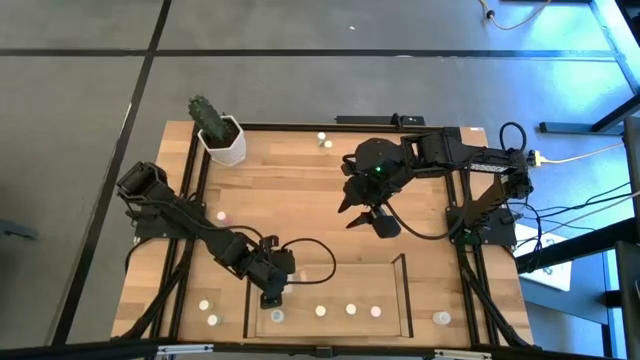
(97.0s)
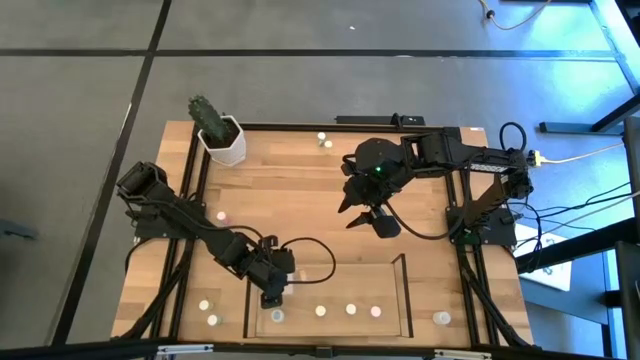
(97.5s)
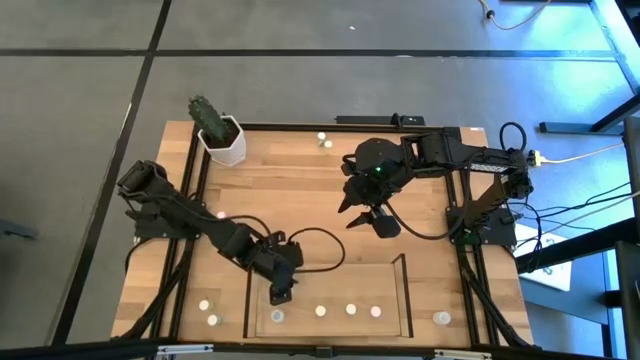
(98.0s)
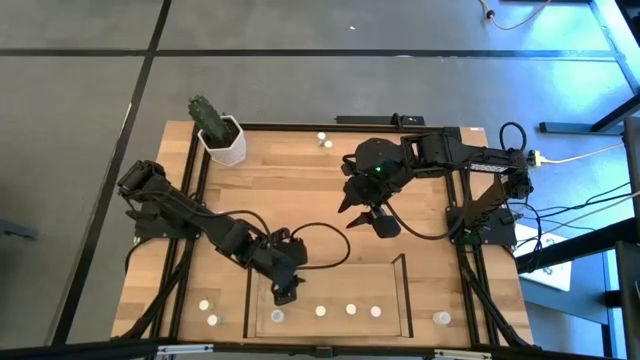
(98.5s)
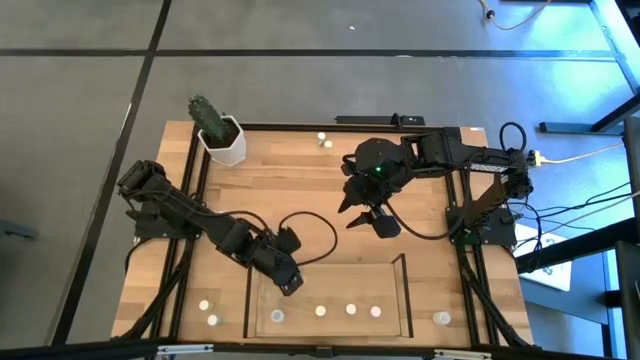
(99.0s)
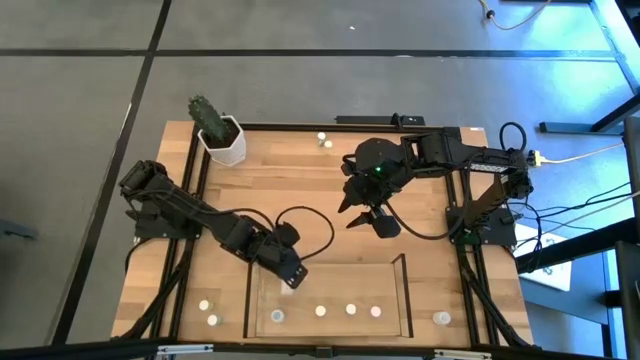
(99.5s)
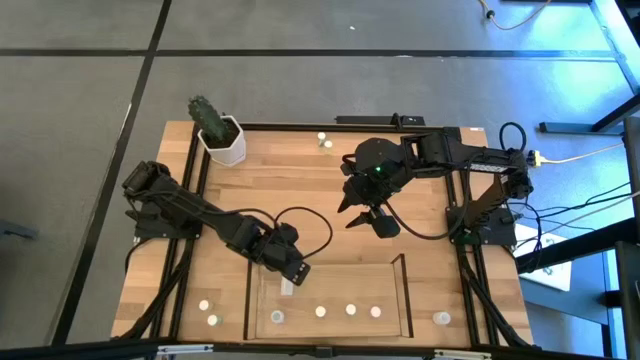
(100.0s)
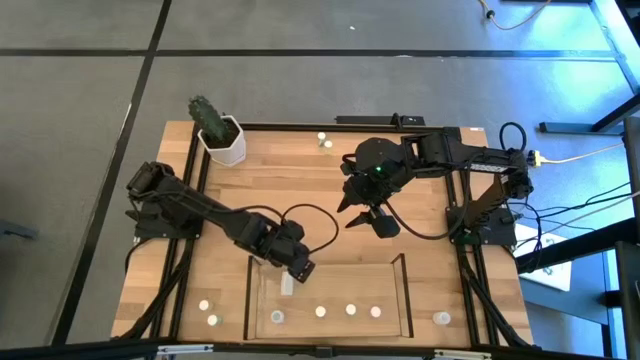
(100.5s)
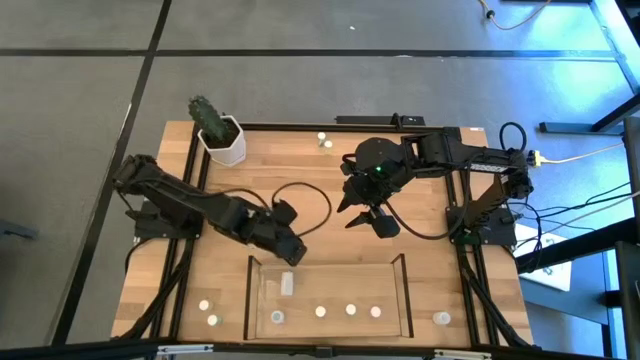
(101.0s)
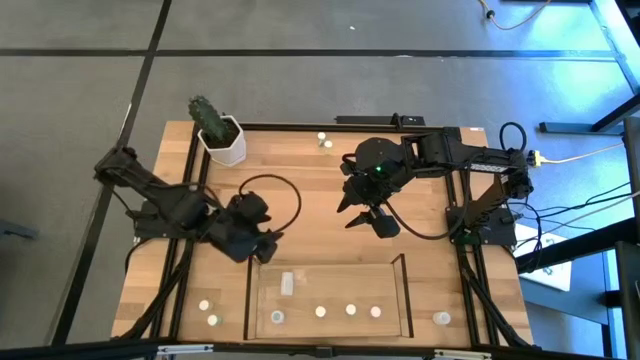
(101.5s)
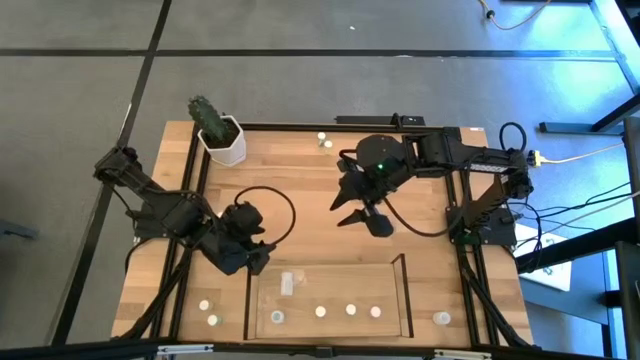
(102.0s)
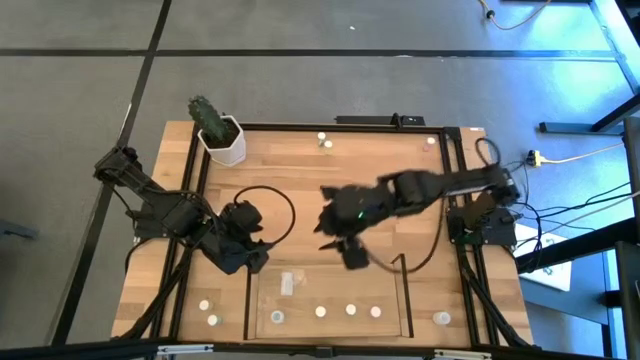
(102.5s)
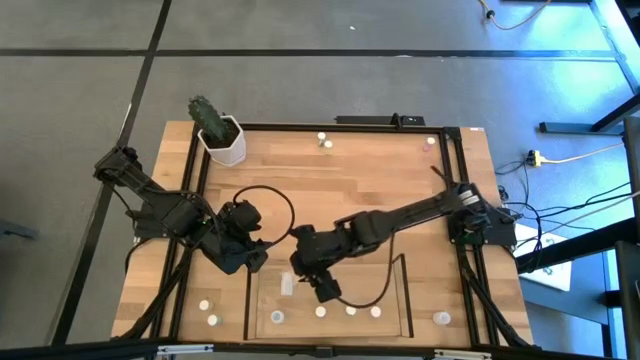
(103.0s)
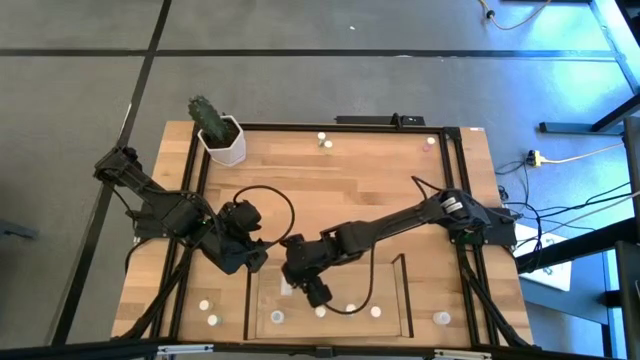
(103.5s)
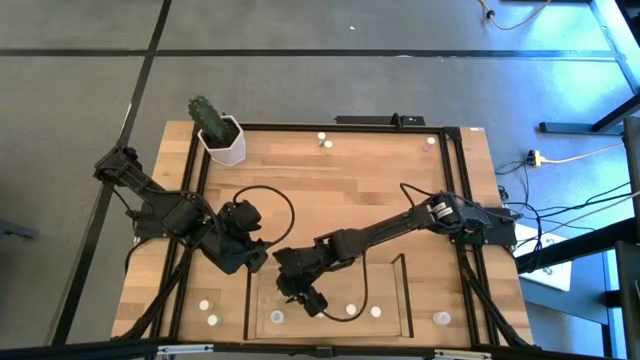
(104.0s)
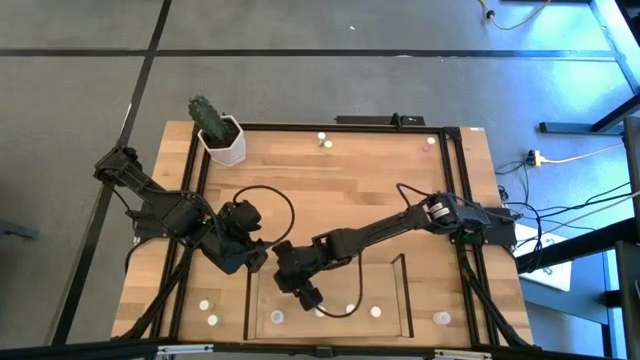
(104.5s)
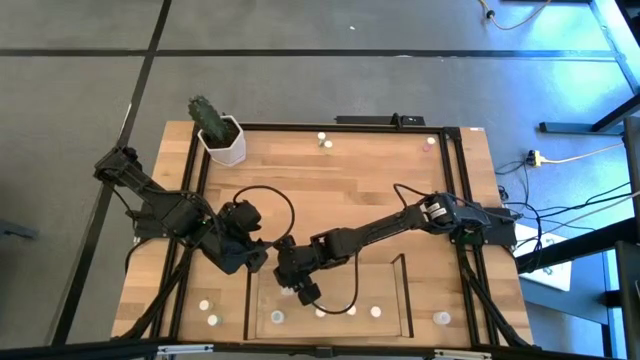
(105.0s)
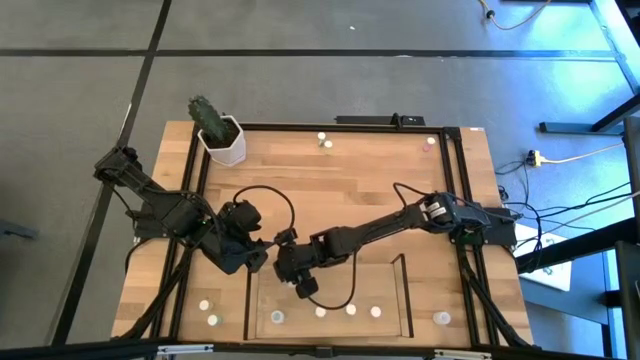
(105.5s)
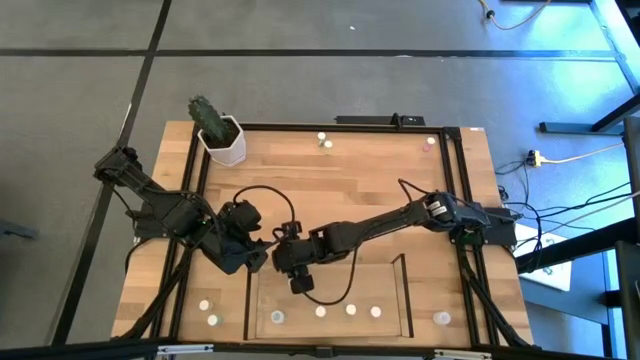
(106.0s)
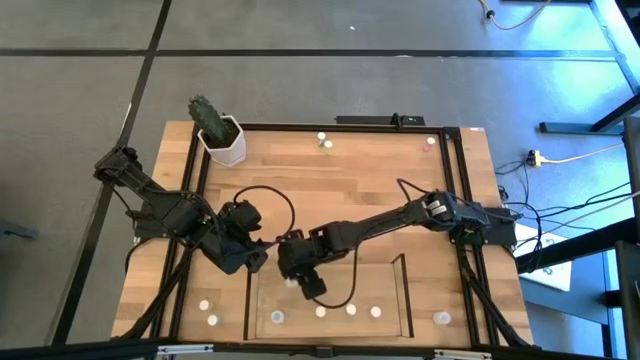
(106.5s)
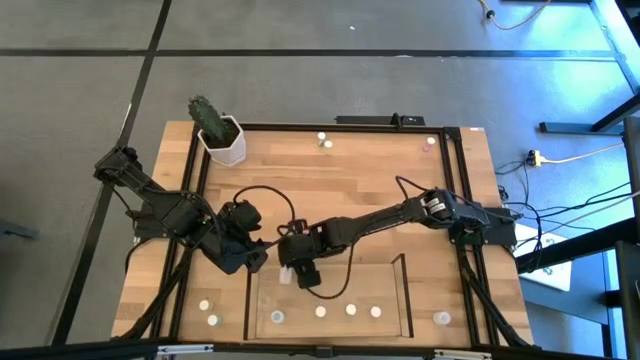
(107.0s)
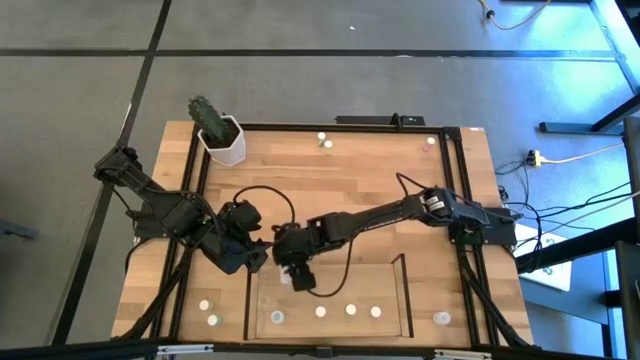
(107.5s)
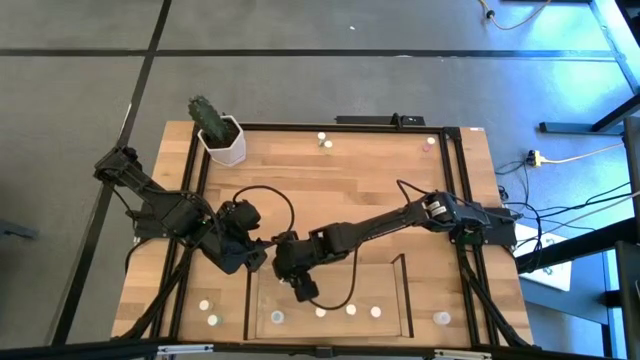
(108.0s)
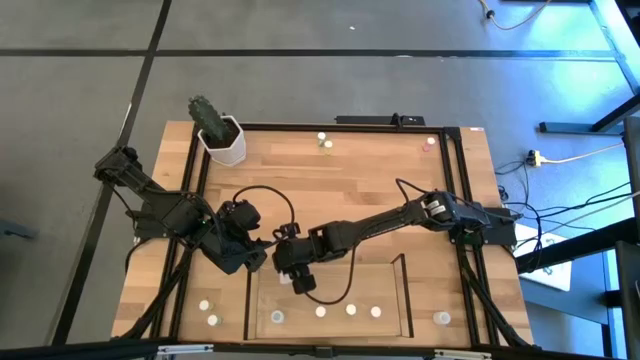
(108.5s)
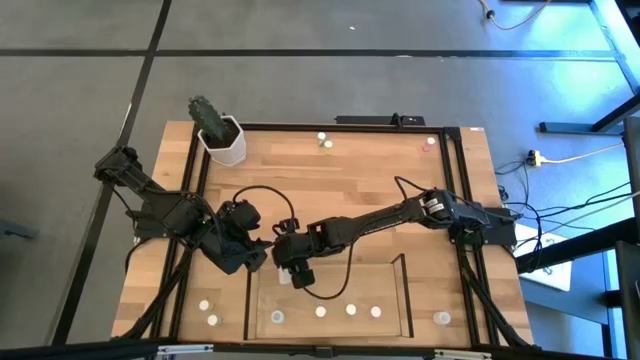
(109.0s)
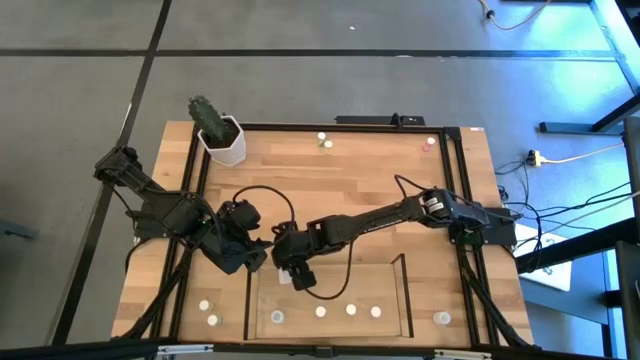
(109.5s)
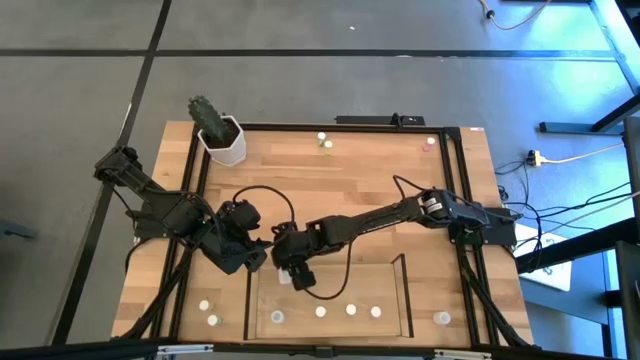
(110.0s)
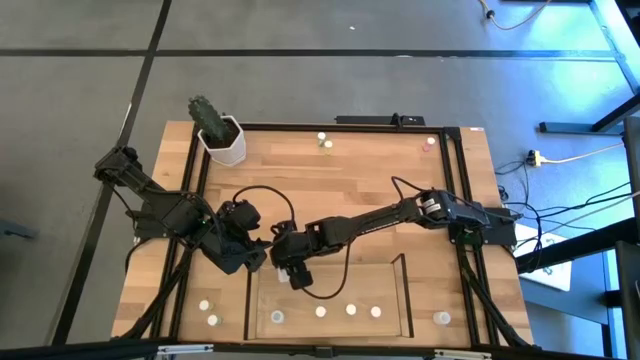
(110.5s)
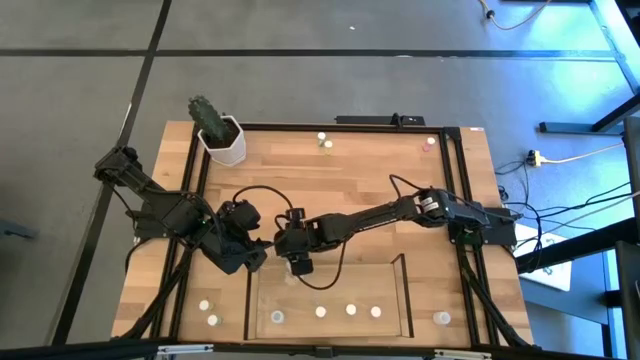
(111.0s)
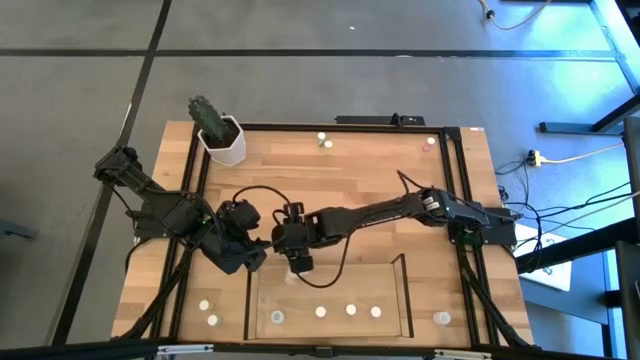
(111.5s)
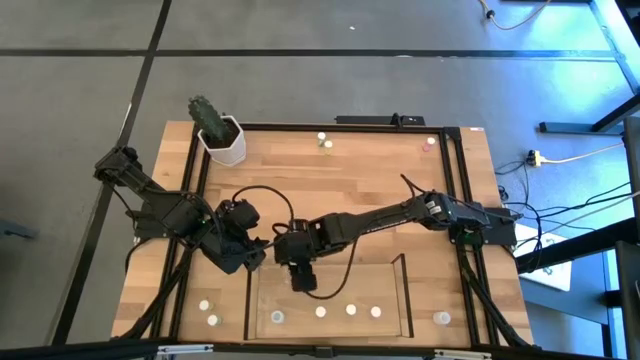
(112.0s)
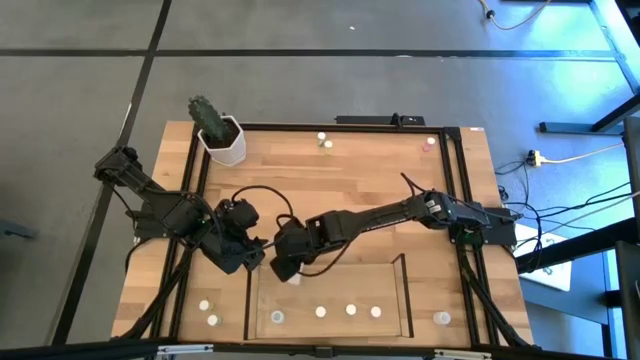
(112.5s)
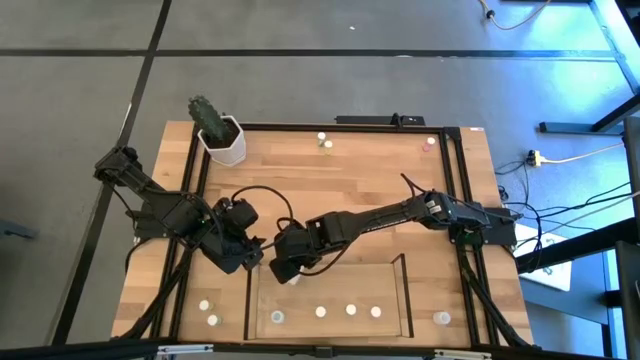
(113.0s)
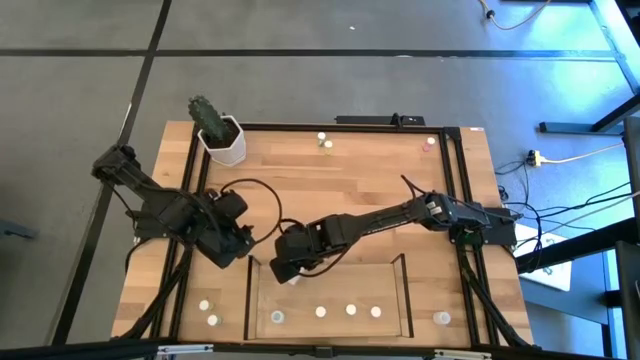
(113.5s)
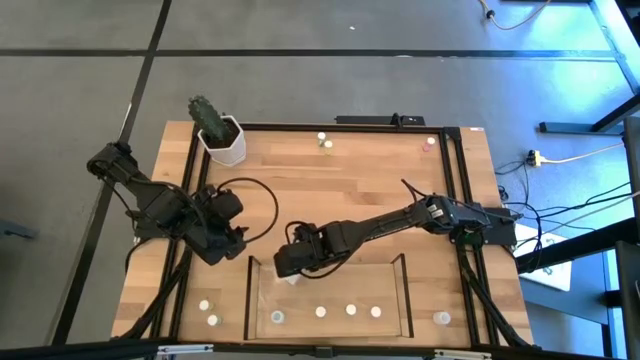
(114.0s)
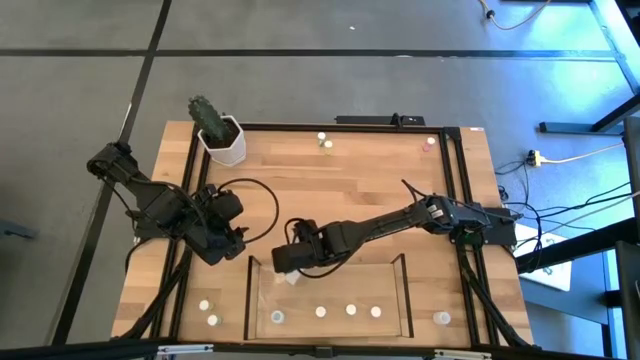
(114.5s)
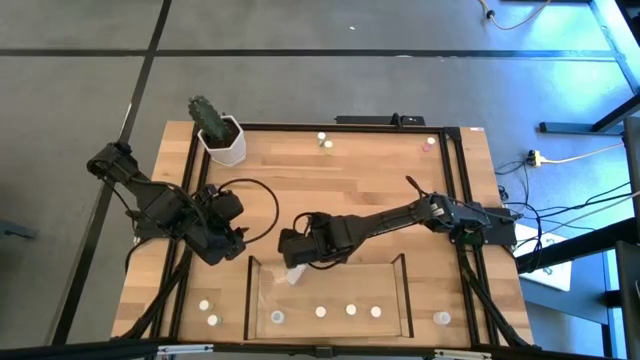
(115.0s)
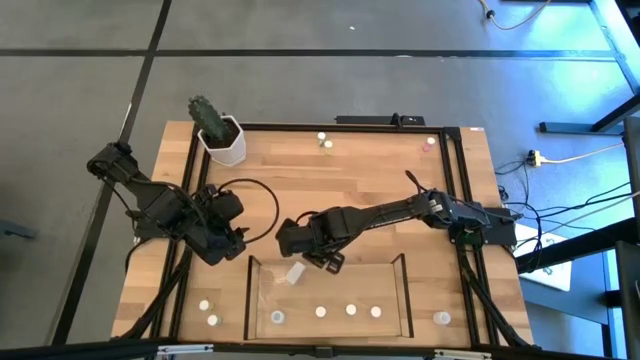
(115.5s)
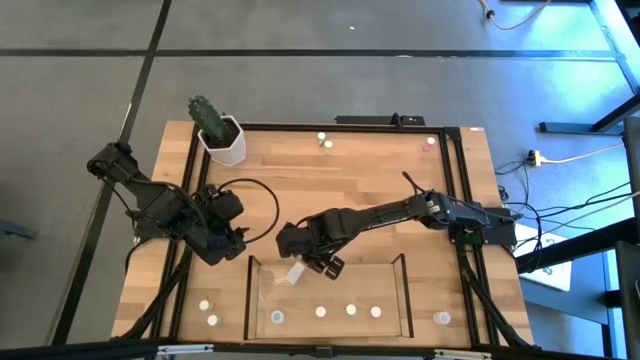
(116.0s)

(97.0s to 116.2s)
Task: Pick and place medicine bottles onto shelf by color
Put the top white pill bottle on the shelf aligned with the other white pill bottle

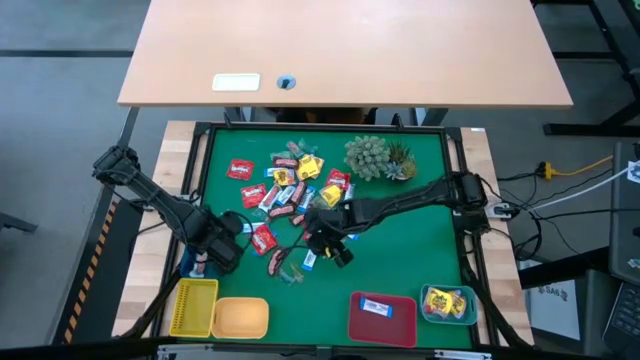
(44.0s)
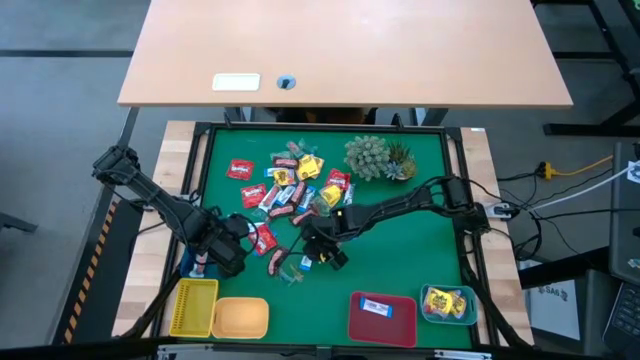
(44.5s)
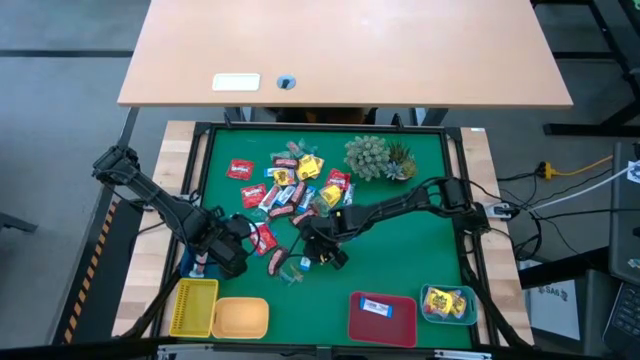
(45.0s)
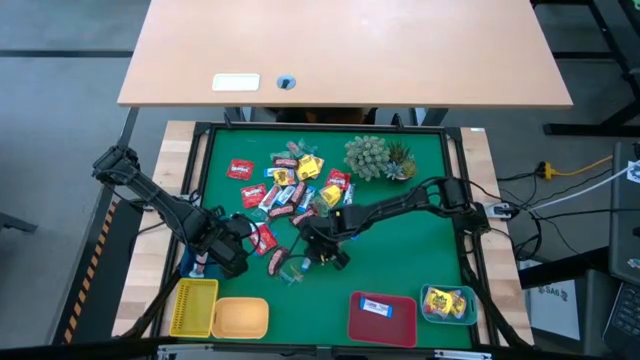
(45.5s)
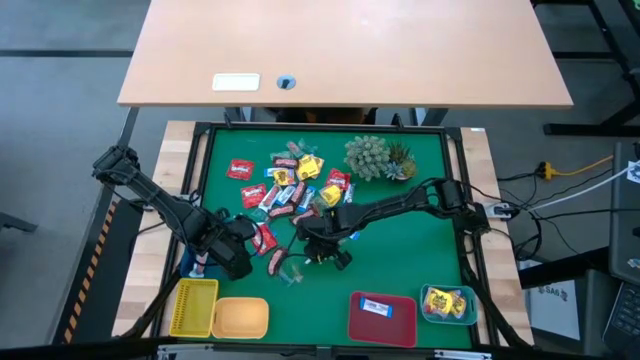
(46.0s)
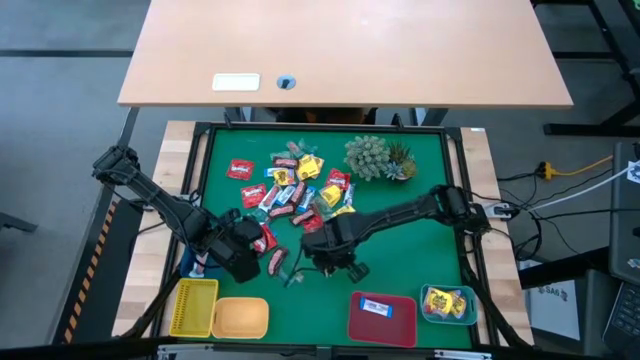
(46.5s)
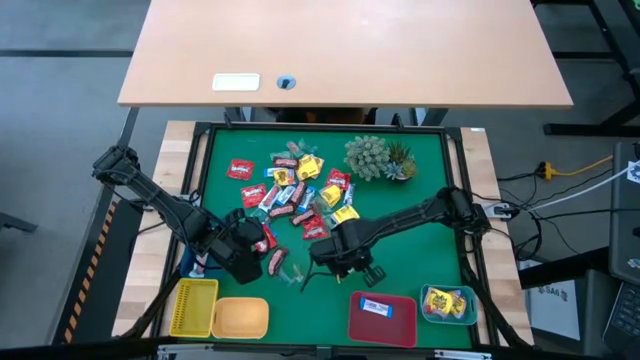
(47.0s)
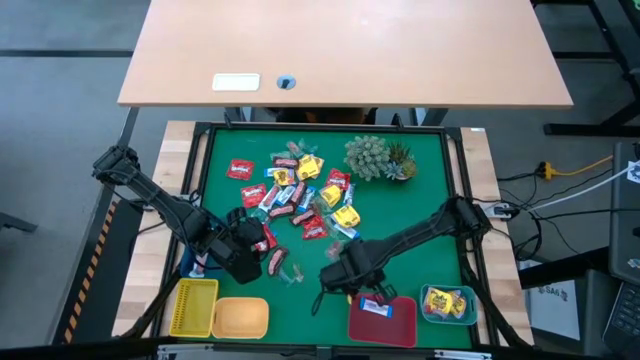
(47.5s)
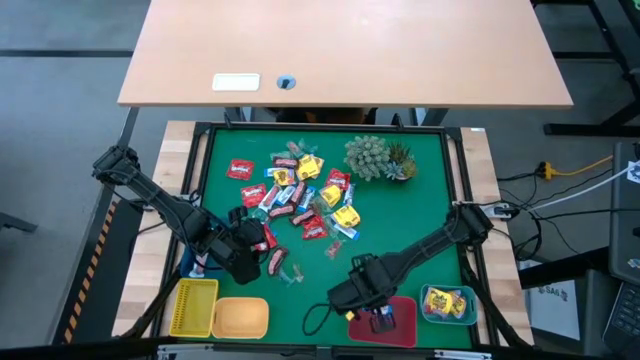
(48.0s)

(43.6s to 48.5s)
Task: Sort candy
Put the blue chocolate into the red bin
